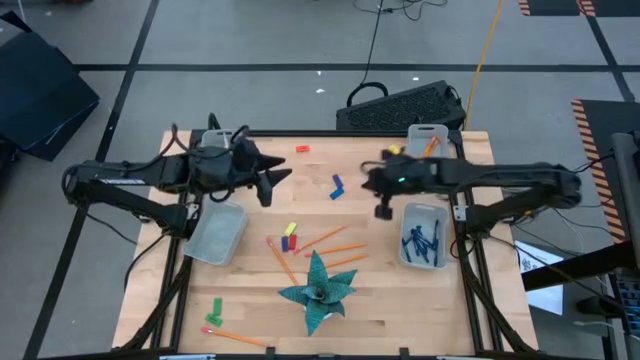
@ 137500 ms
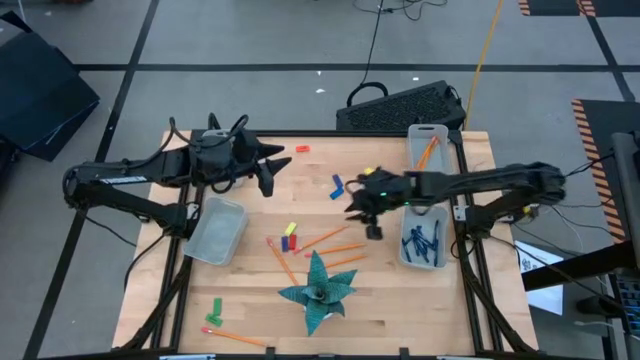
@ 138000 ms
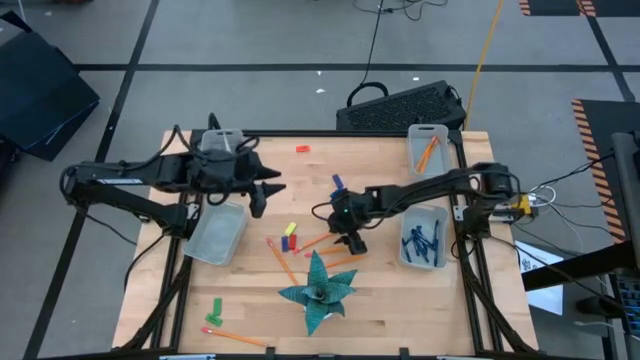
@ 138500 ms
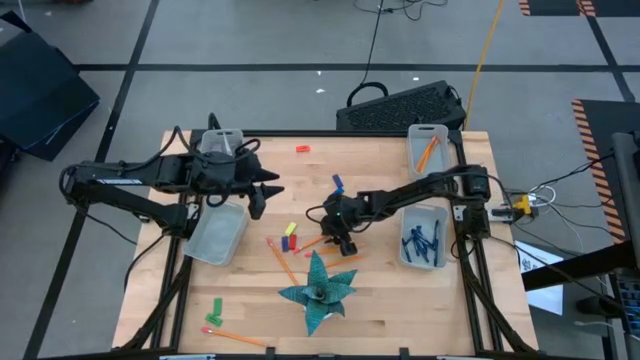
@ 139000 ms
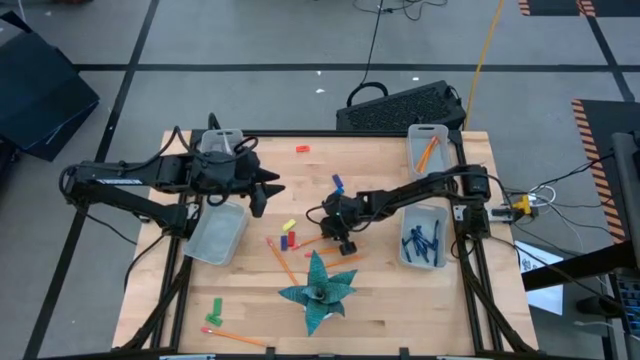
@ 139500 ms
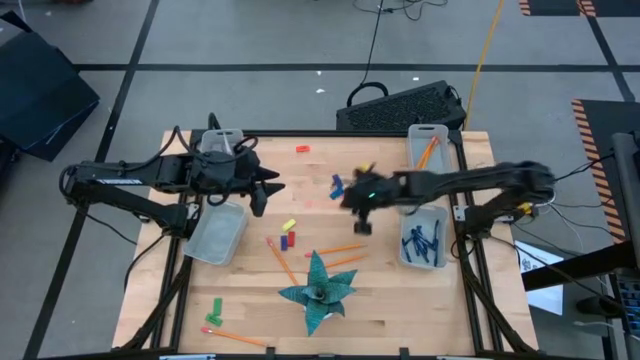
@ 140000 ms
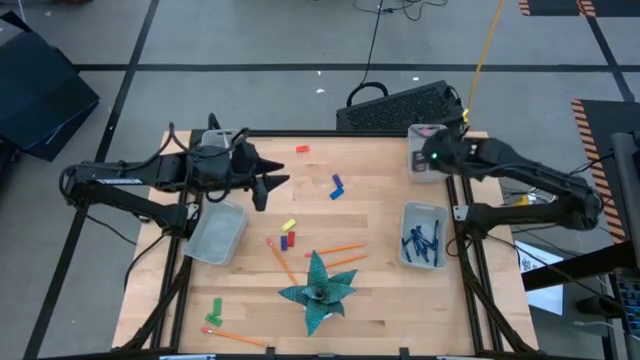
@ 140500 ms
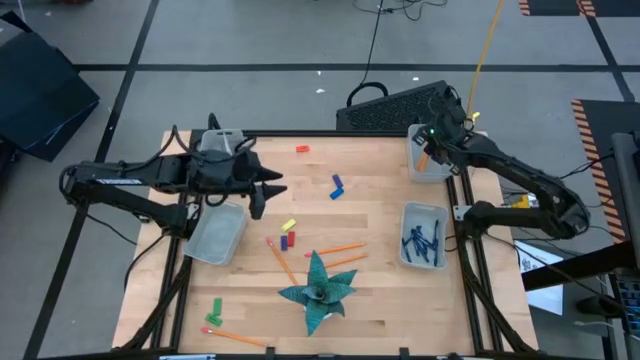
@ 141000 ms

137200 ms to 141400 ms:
Task: Sort crayons/erasers/pens/pencils in bins
Put the orange pencil into the top right gray bin

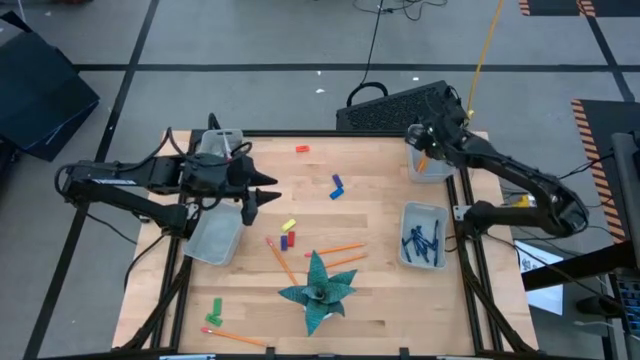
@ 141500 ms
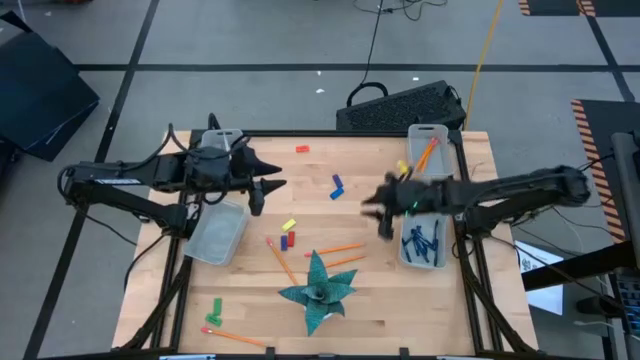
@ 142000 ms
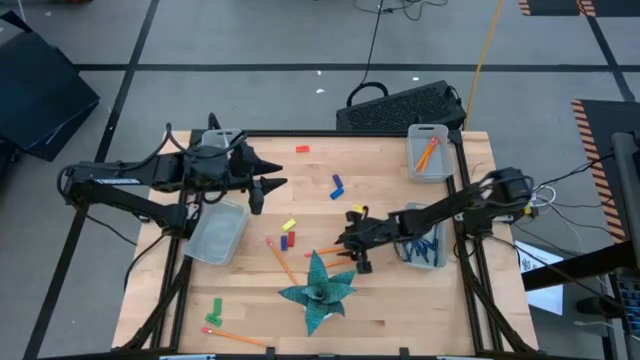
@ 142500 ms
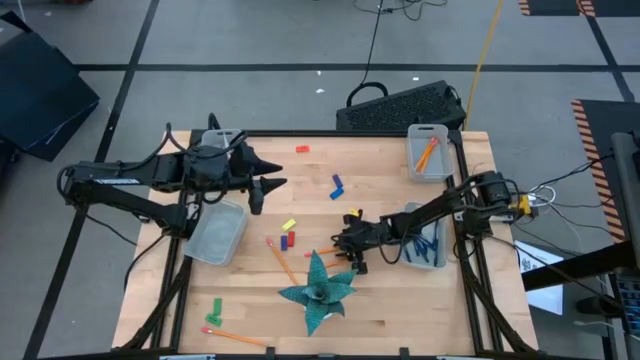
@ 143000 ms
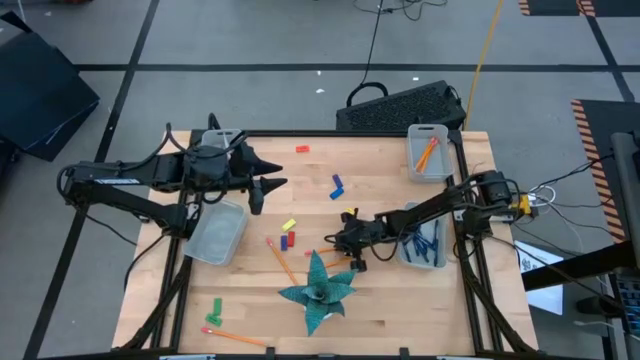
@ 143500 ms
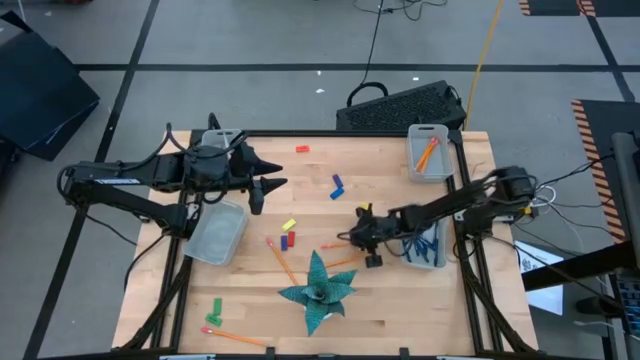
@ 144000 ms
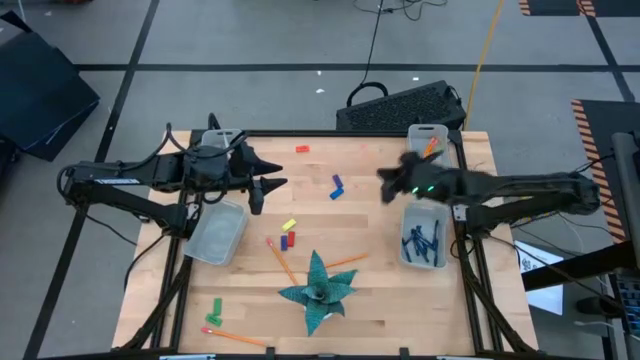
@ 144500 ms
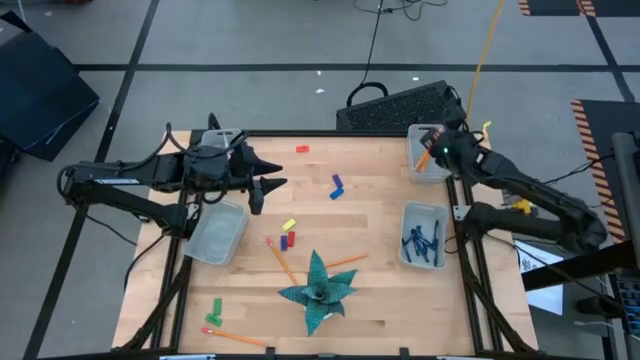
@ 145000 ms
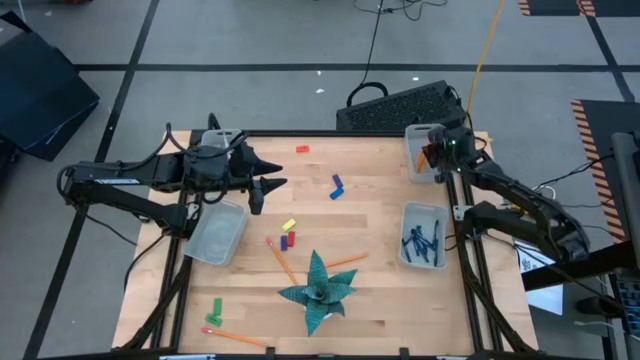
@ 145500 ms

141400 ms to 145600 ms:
Put the orange pencil into the top right gray bin

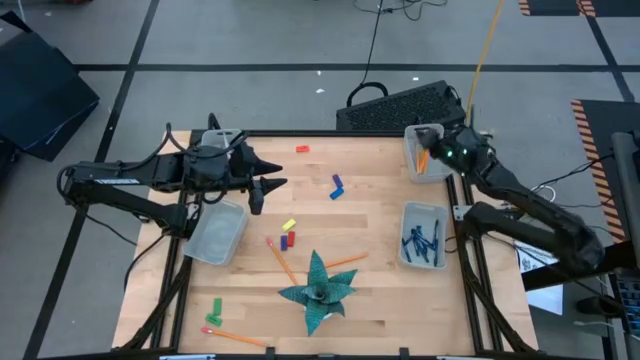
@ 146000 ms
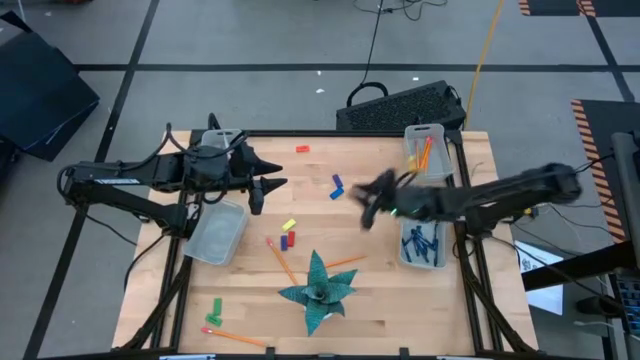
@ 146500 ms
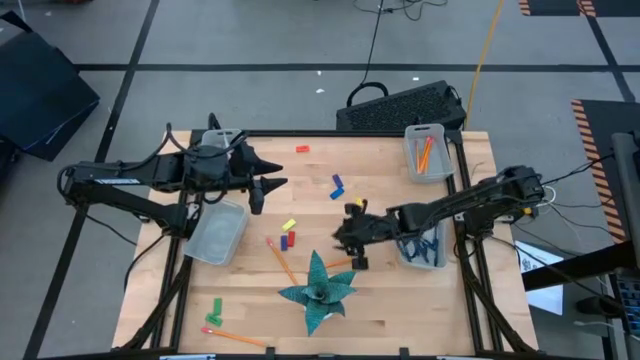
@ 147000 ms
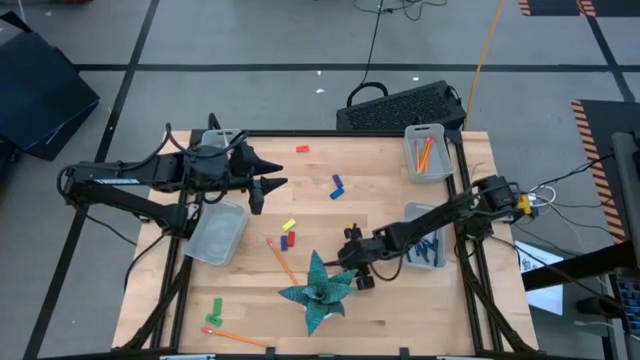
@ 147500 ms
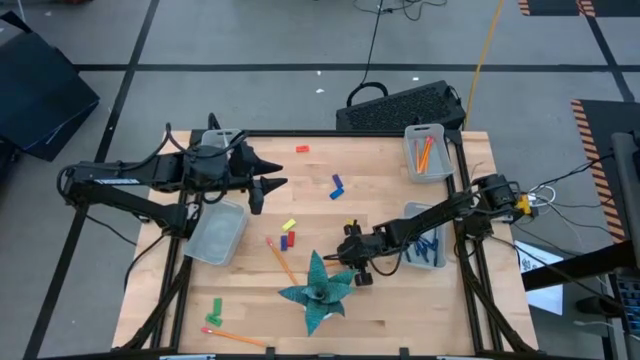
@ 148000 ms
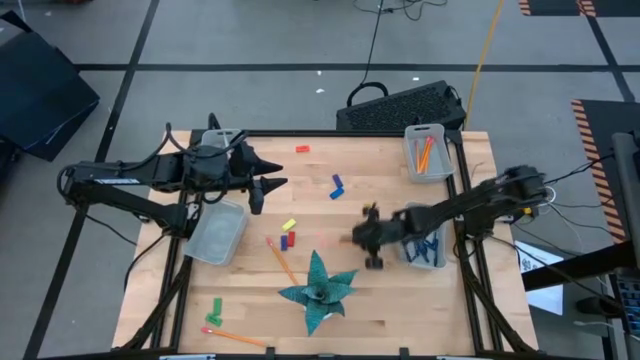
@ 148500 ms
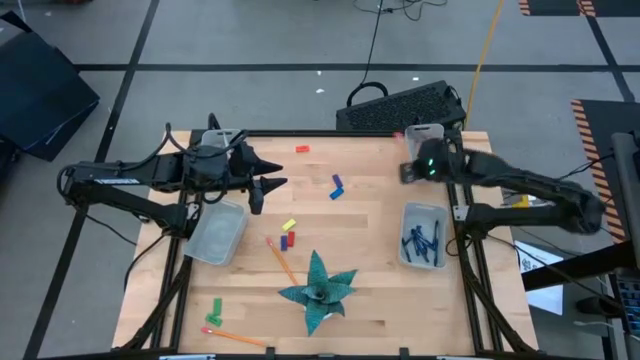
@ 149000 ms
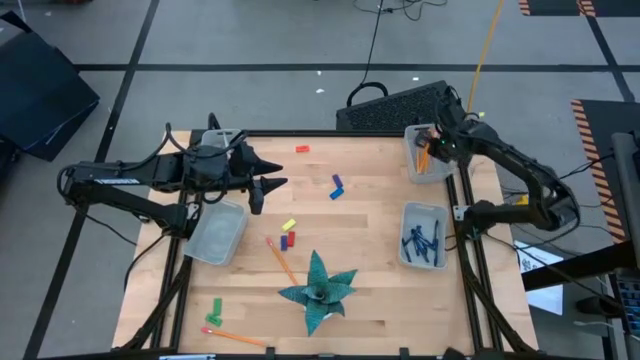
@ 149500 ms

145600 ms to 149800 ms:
Put the top right orange pencil into the top right gray bin

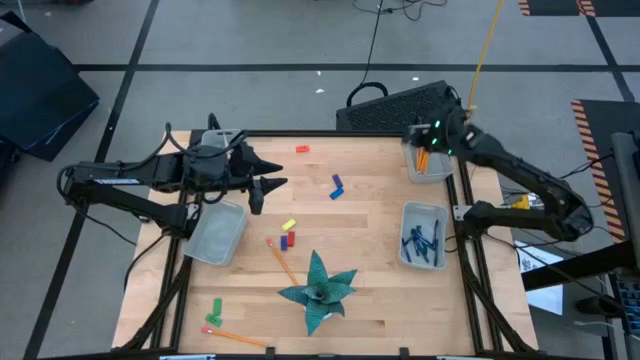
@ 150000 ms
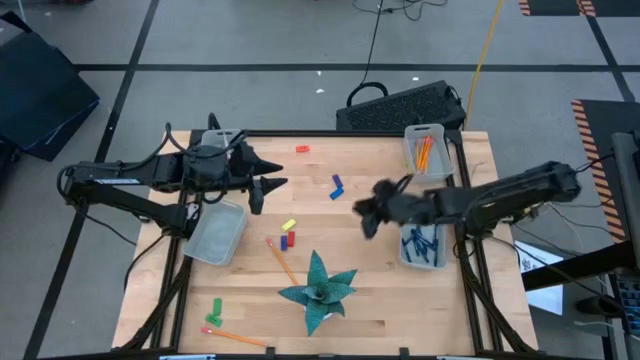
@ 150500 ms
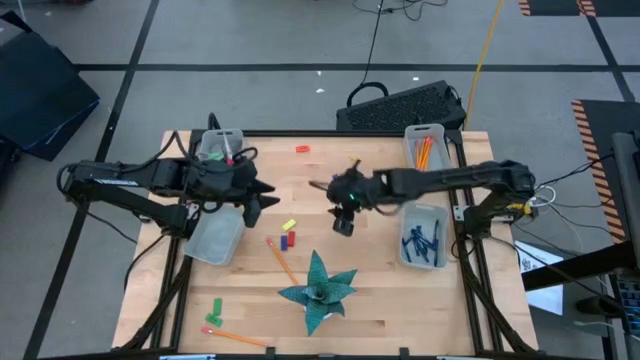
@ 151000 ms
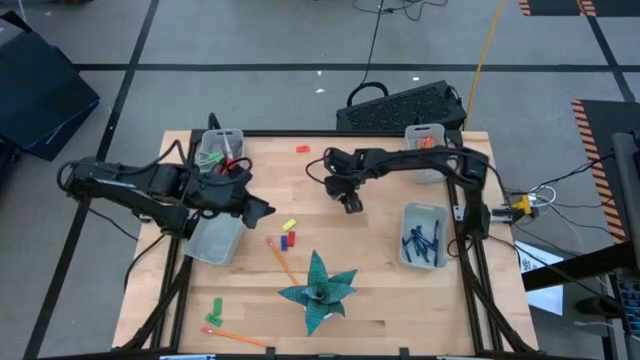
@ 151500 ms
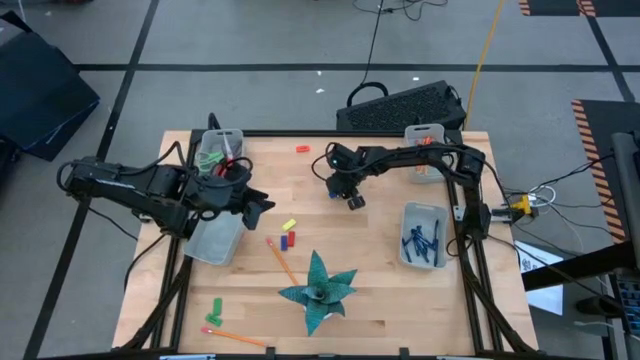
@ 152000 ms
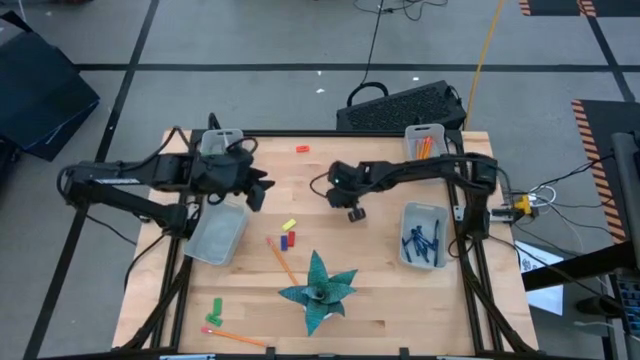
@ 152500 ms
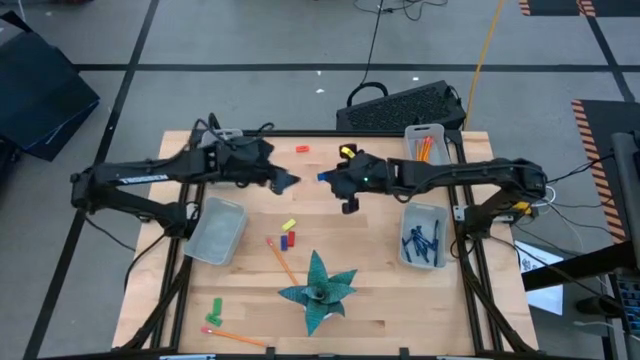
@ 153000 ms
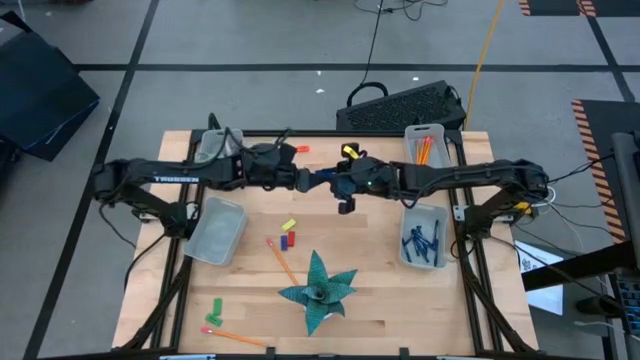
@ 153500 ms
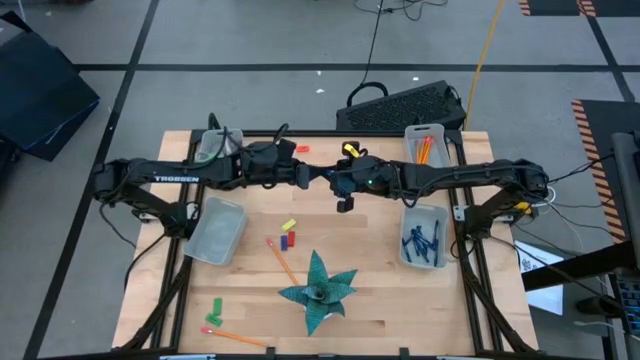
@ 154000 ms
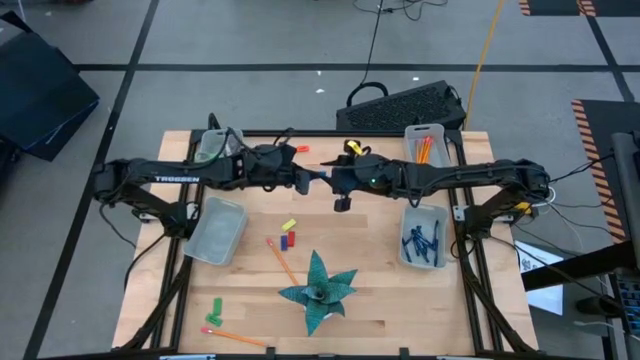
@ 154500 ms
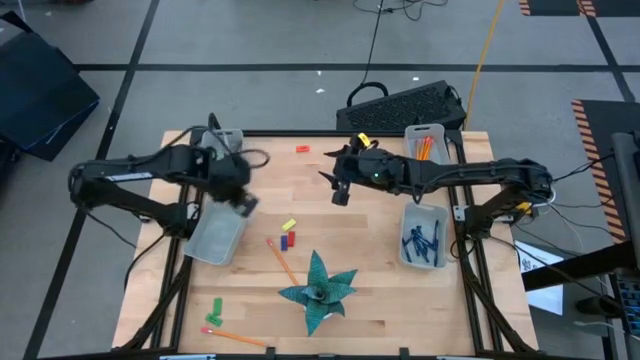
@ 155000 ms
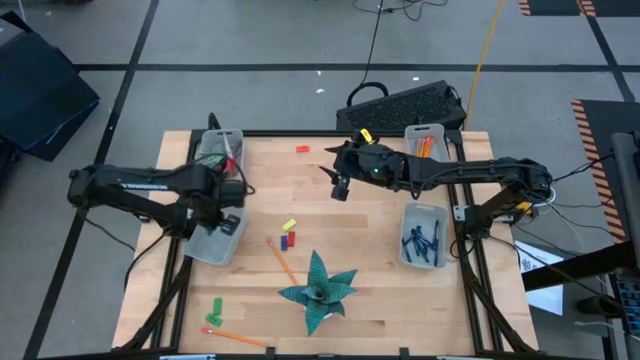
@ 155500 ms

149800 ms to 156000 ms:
Put the blue eraser into the bottom left gray bin

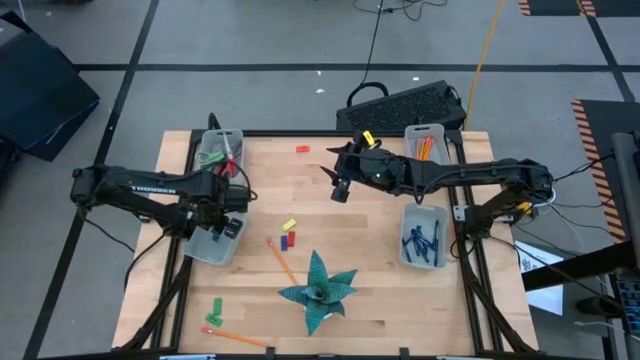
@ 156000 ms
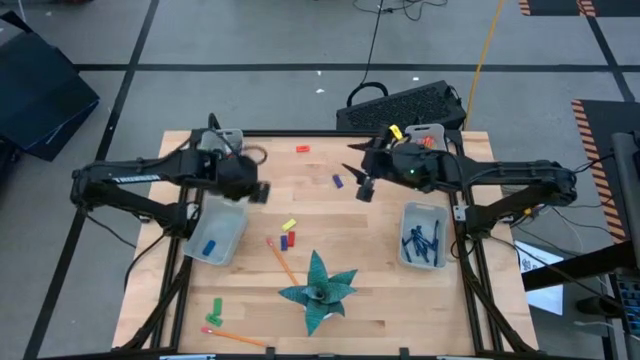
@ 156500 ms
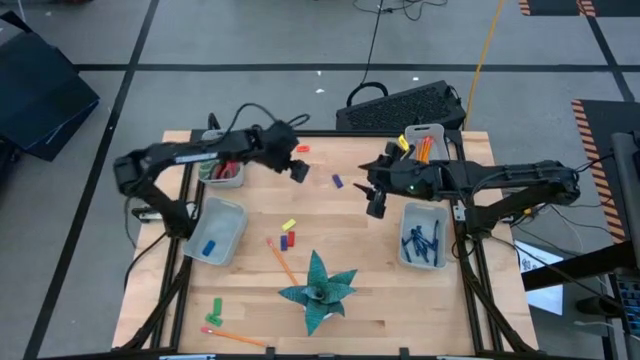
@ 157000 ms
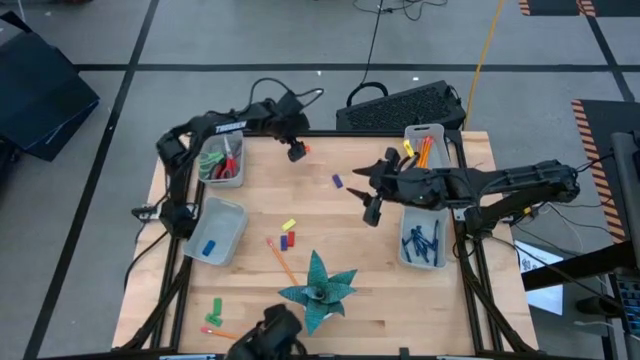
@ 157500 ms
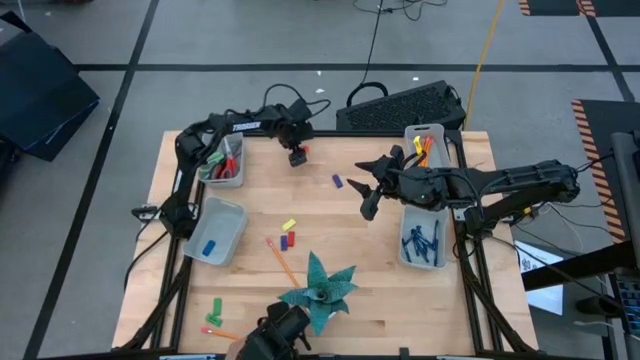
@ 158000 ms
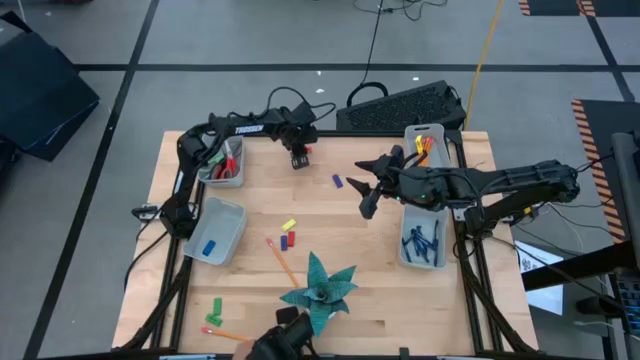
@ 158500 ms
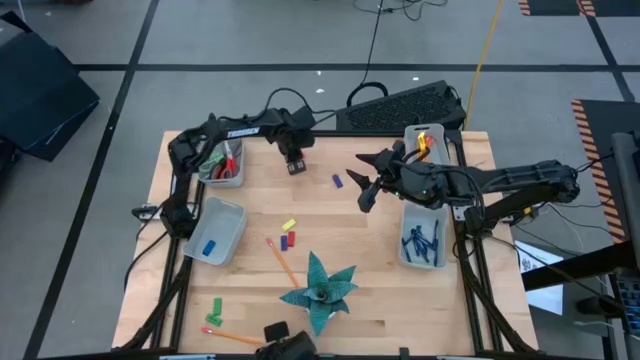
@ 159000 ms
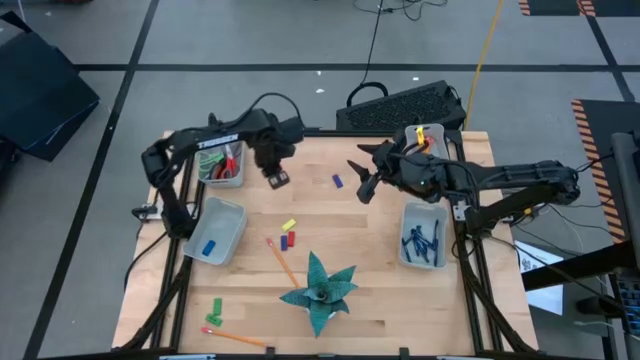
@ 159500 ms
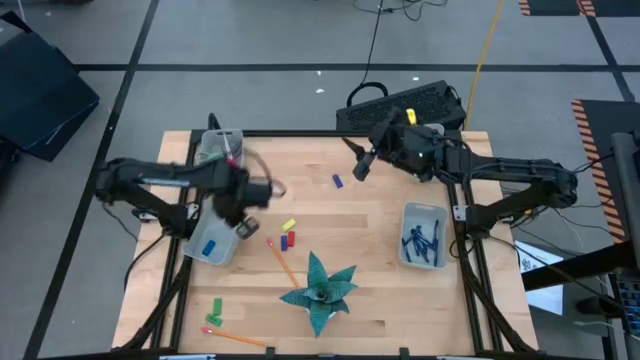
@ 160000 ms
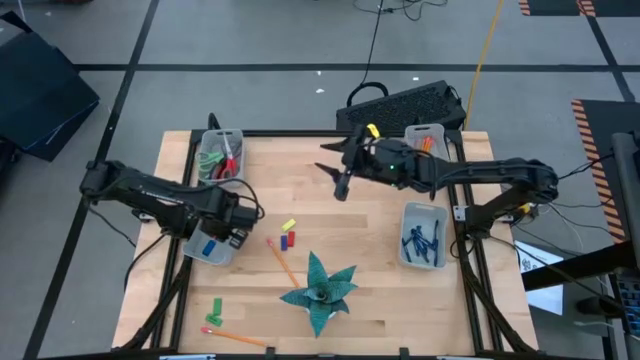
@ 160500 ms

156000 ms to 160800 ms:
Put the orange eraser into the bottom left gray bin
